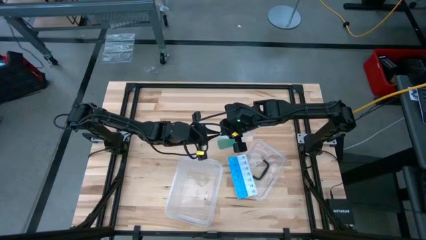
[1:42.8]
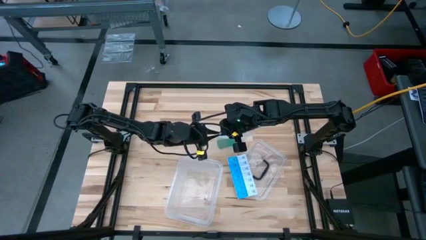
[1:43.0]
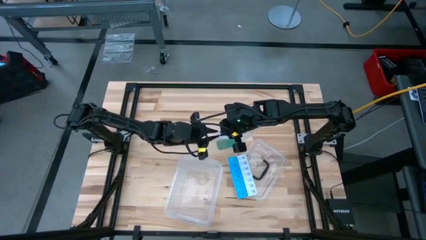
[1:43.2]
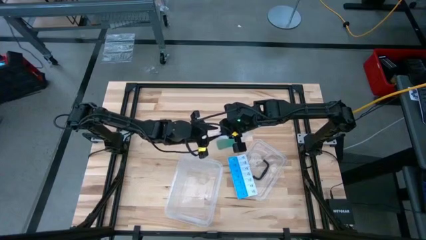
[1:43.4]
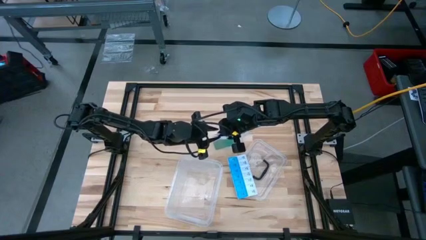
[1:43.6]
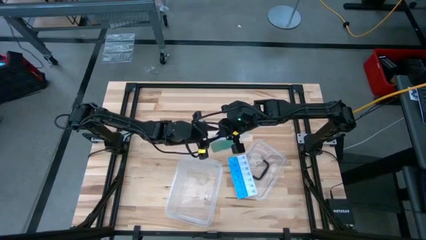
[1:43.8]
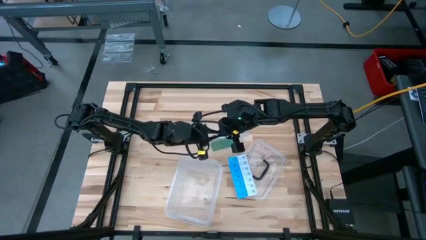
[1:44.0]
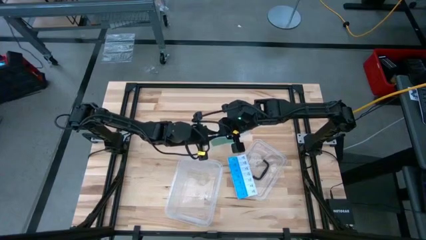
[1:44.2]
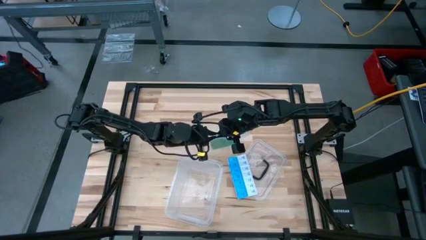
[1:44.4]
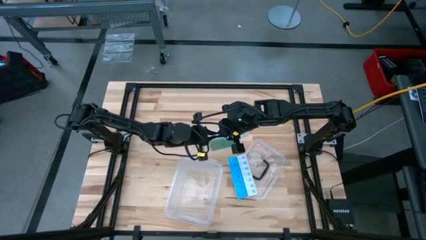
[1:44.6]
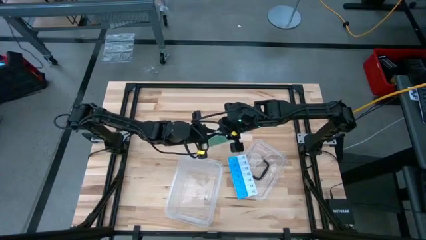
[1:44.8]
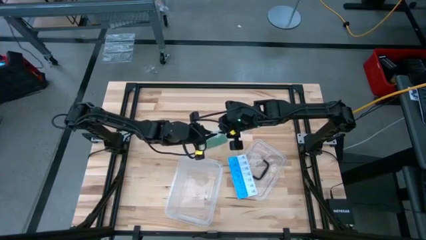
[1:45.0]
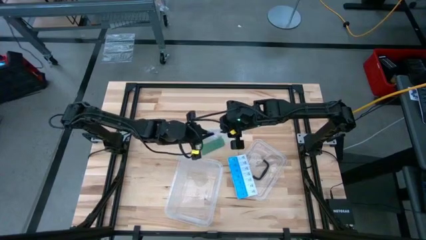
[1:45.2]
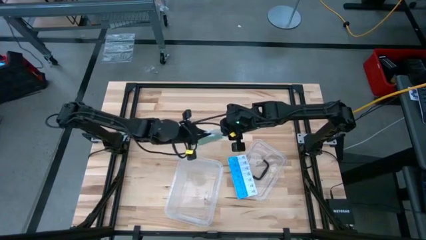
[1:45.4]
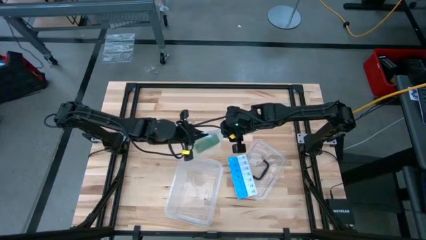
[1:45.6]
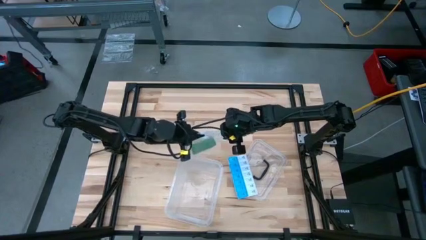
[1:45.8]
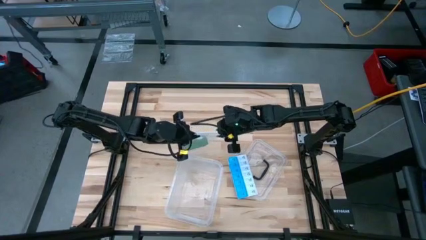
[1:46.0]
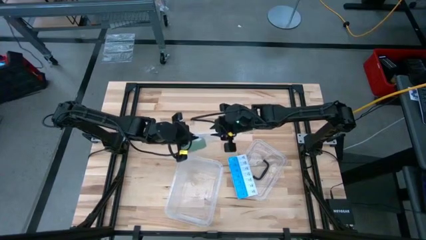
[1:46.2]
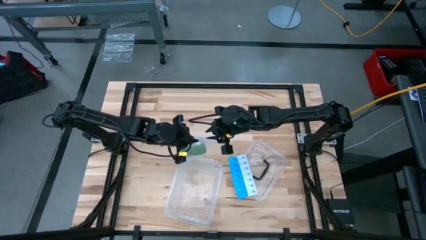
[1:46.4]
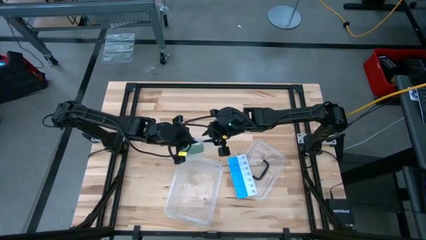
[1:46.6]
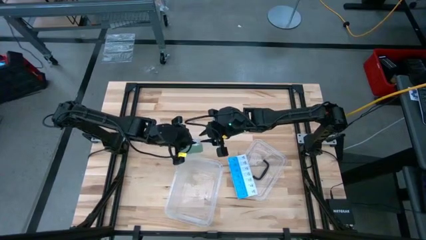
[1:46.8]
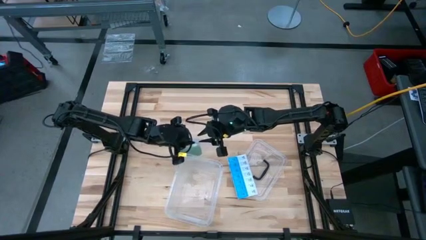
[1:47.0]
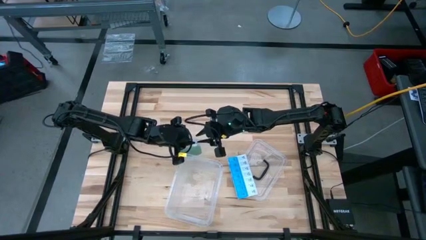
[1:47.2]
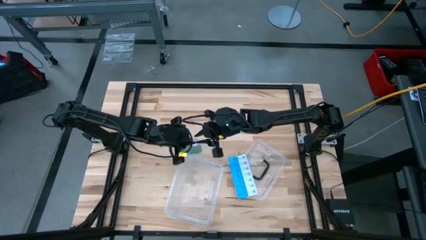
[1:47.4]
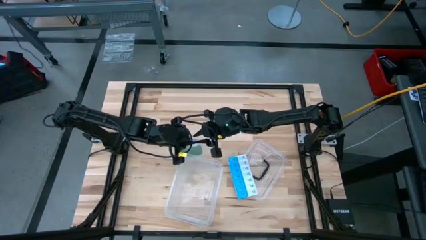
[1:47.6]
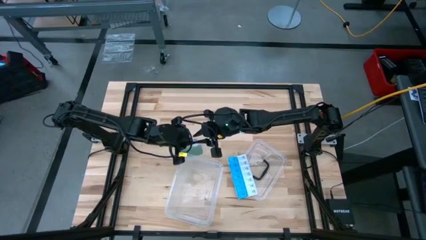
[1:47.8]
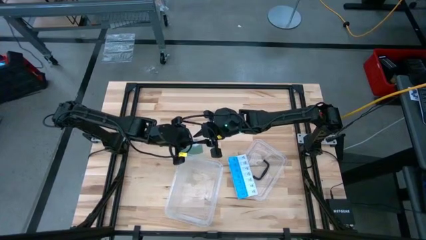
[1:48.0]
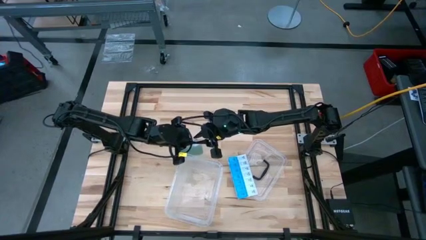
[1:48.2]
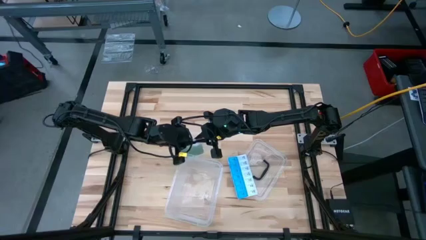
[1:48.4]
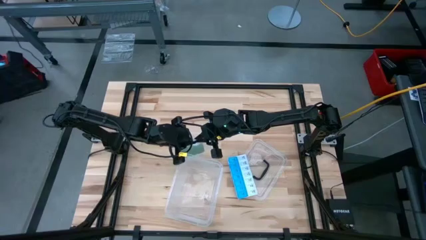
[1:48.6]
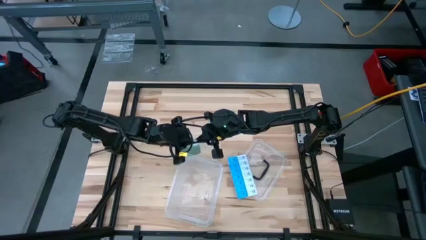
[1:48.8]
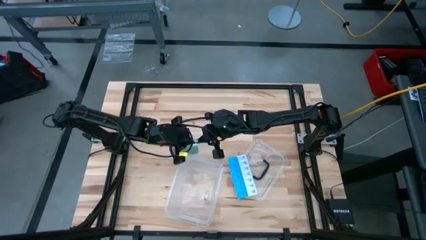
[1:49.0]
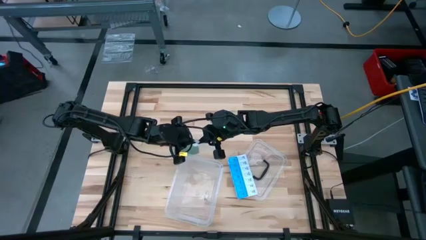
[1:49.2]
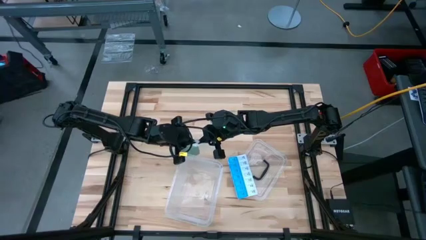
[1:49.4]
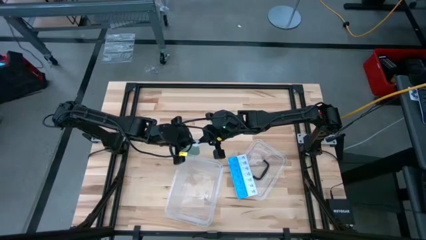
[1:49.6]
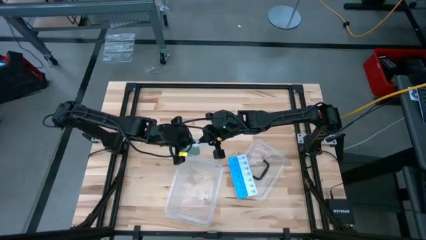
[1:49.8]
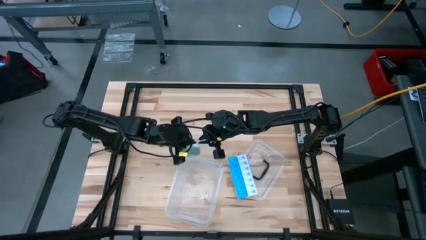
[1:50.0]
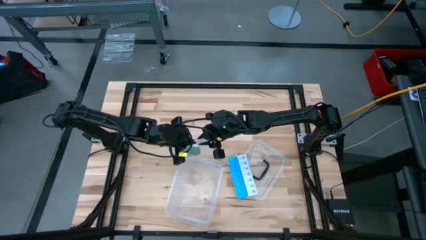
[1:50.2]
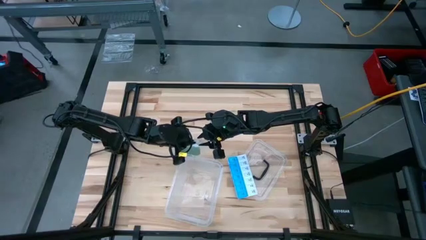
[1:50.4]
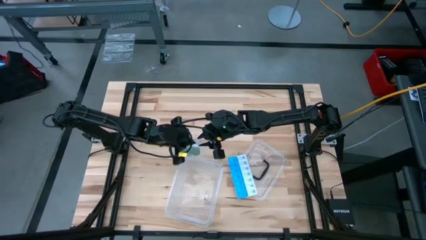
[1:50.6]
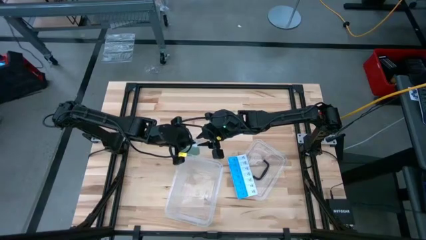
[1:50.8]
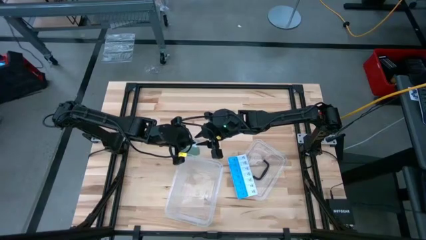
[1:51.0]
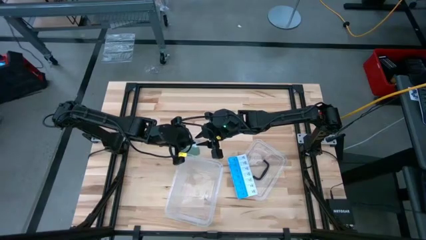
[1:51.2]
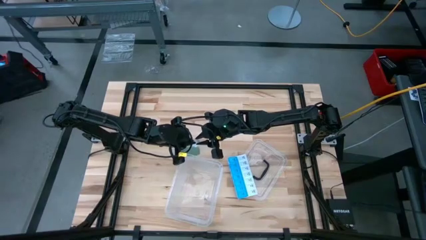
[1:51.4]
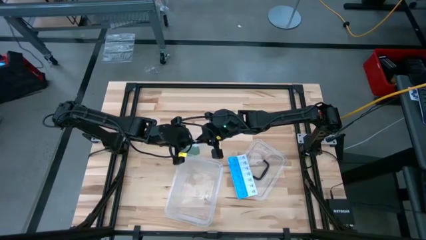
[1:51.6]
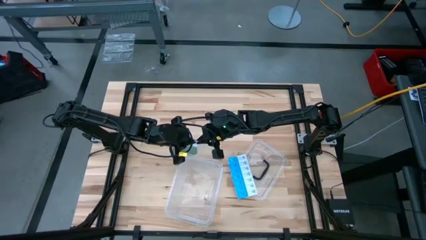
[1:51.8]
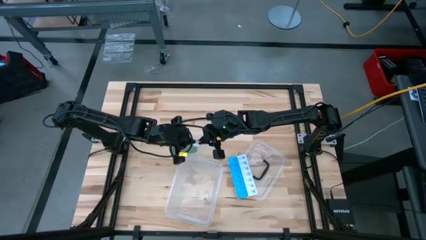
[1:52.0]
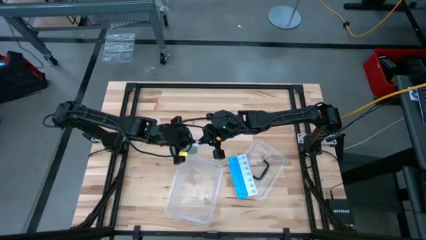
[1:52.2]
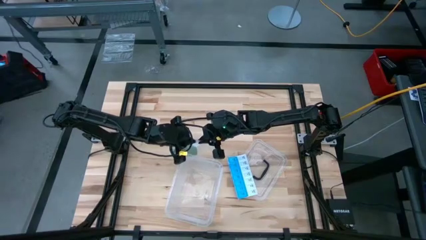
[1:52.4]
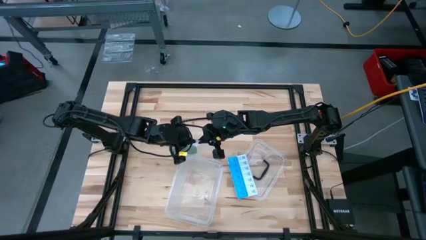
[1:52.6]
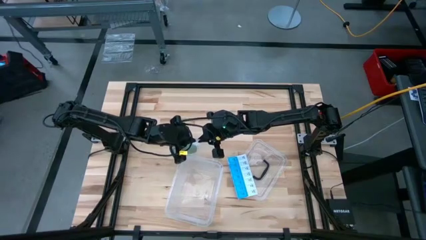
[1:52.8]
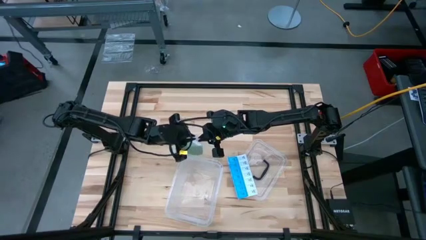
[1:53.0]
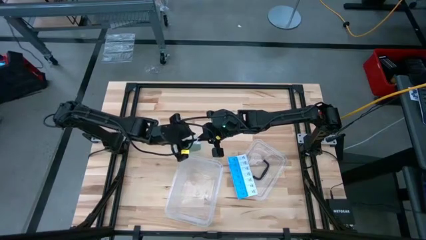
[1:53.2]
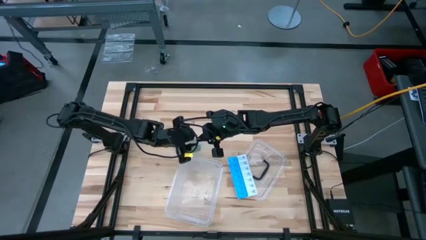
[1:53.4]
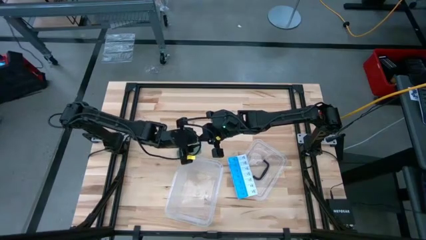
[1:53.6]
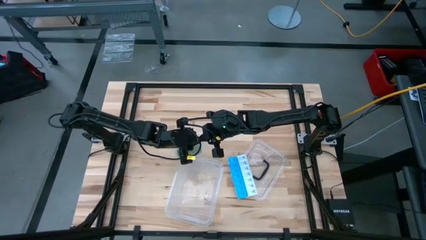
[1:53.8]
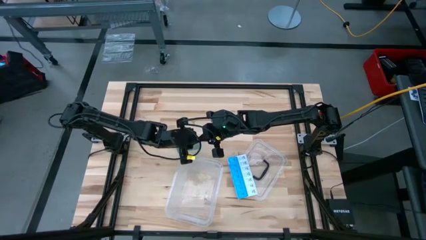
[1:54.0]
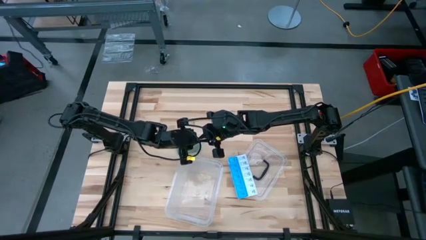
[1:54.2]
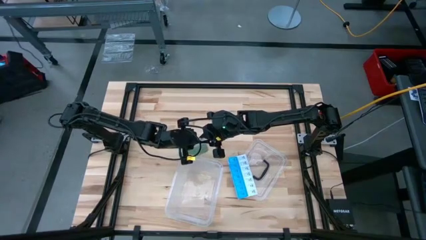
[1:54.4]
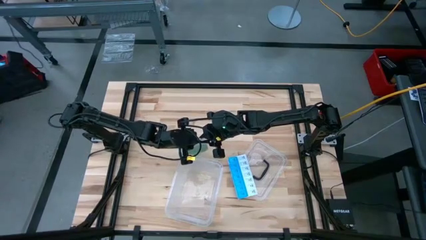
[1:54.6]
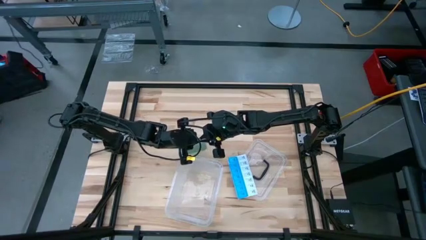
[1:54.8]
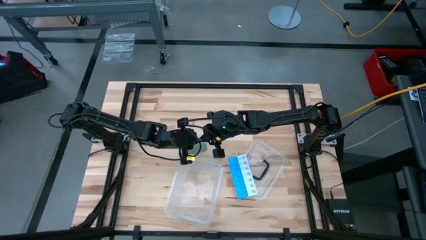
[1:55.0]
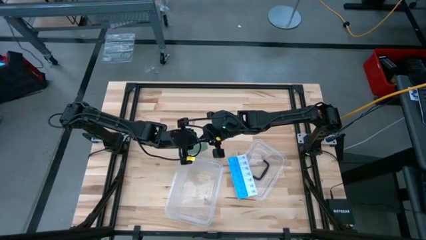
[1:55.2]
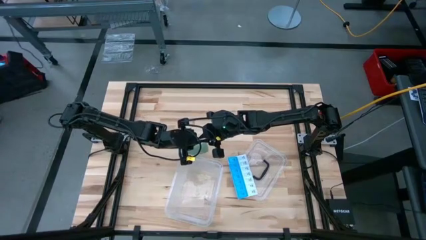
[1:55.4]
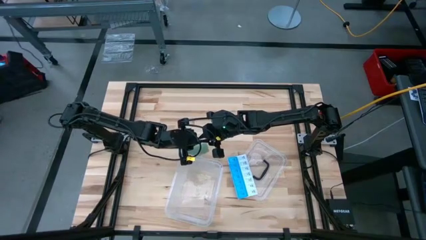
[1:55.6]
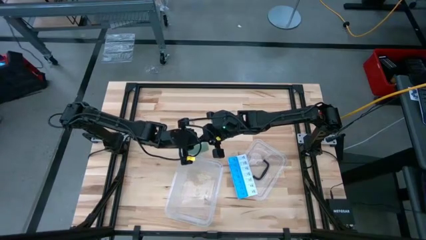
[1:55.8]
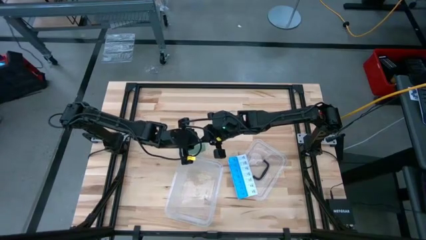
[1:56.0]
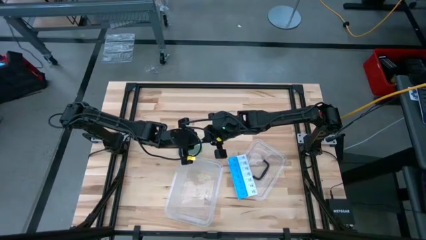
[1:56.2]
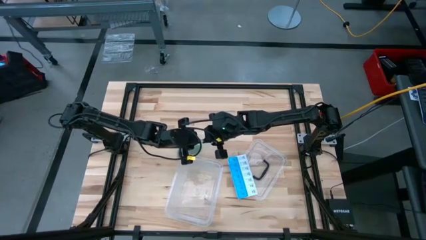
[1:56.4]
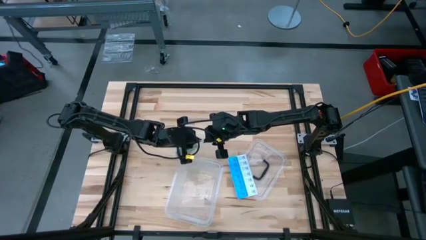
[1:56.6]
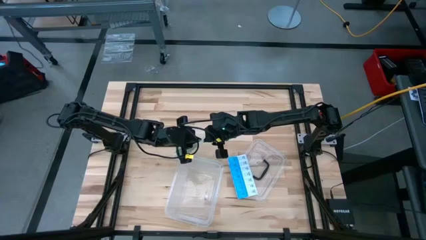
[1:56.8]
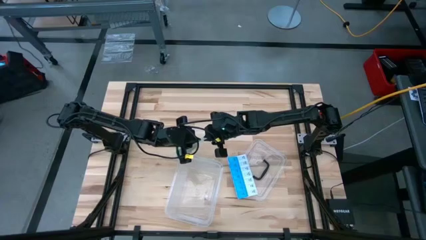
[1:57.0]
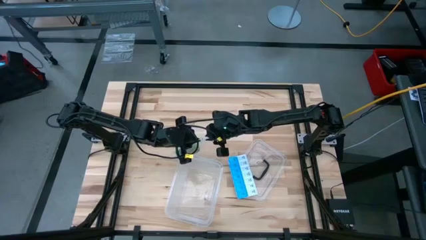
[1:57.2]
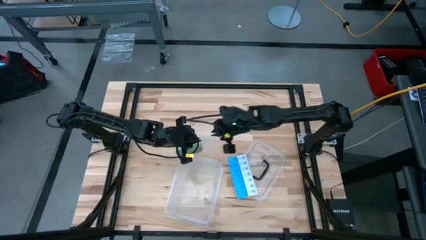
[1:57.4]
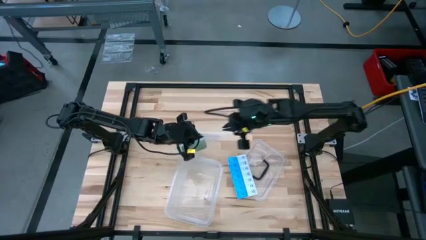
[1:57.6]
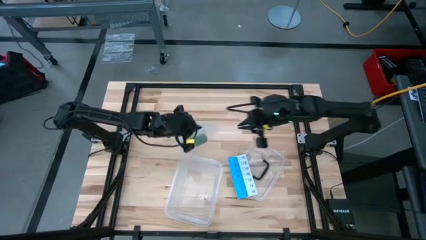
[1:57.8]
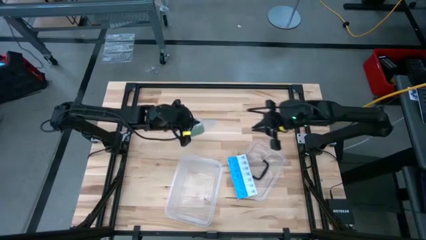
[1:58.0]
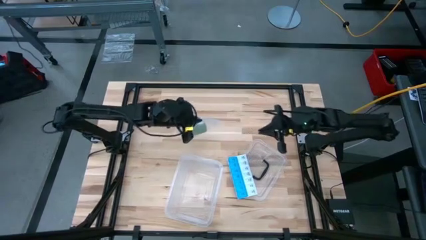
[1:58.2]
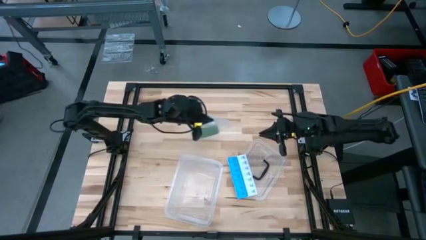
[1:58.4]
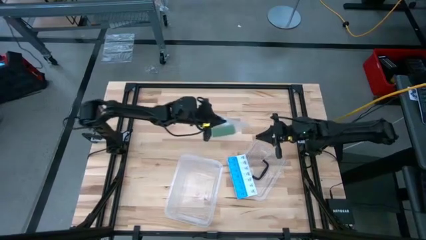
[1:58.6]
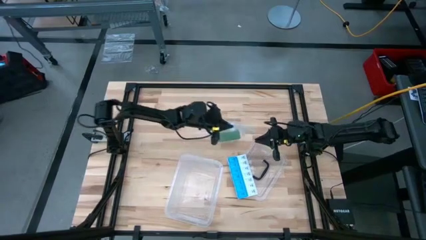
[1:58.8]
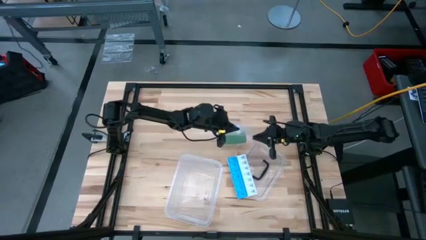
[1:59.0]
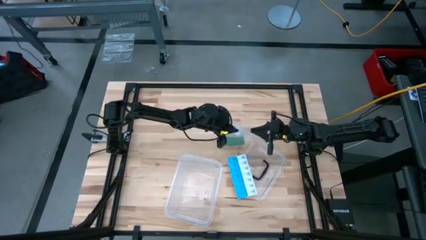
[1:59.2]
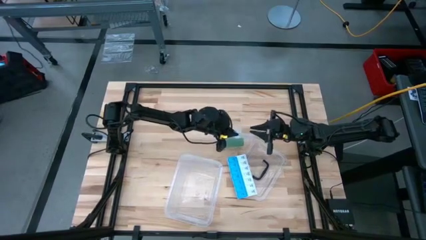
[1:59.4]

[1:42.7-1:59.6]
Task: Roll bandage
Close the transparent zip bag
